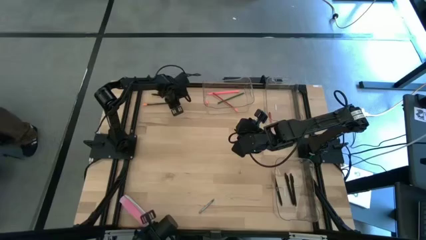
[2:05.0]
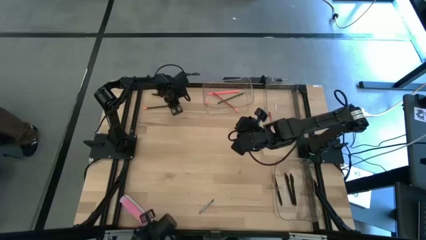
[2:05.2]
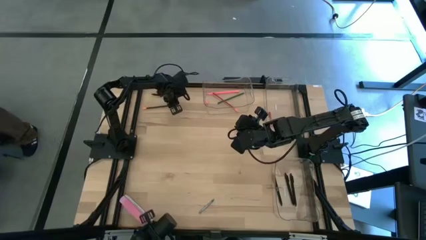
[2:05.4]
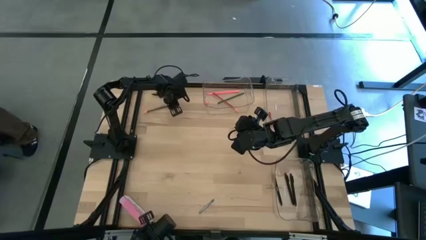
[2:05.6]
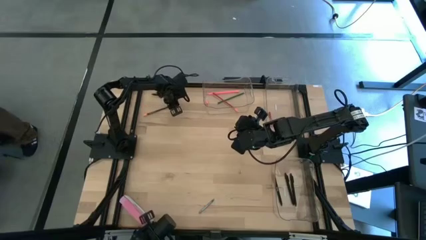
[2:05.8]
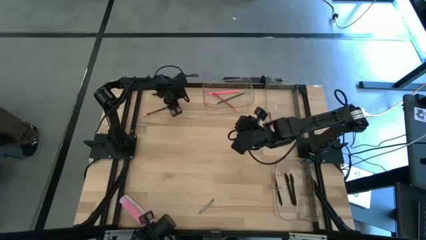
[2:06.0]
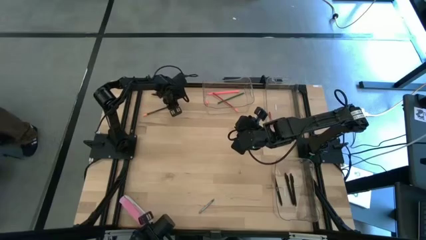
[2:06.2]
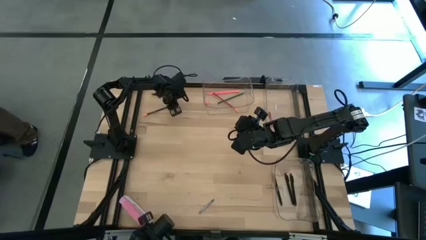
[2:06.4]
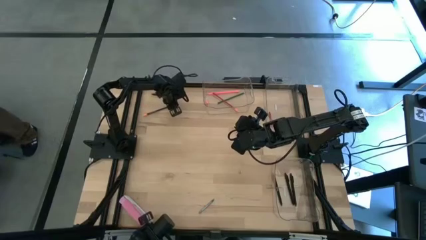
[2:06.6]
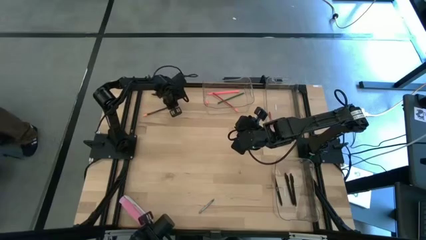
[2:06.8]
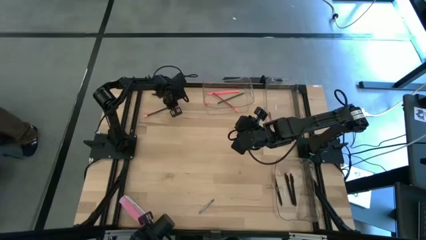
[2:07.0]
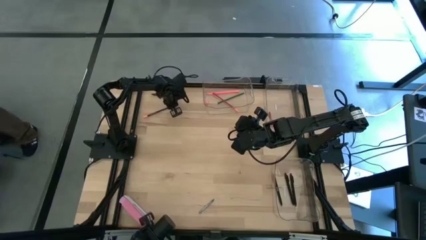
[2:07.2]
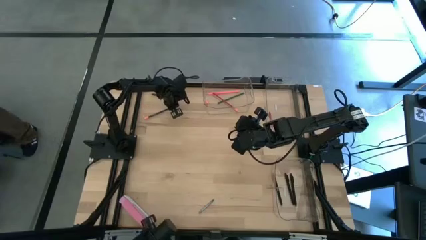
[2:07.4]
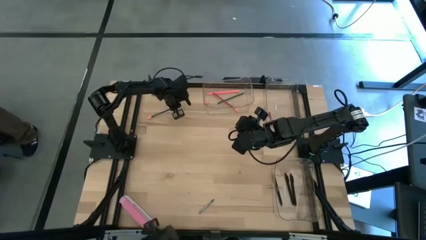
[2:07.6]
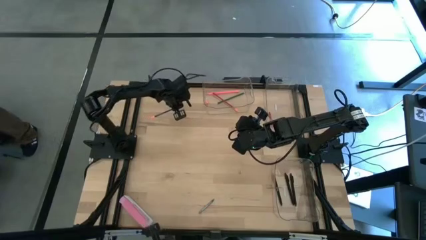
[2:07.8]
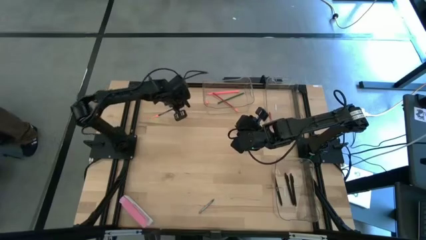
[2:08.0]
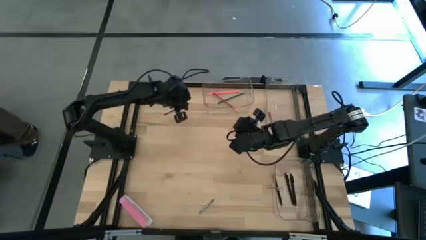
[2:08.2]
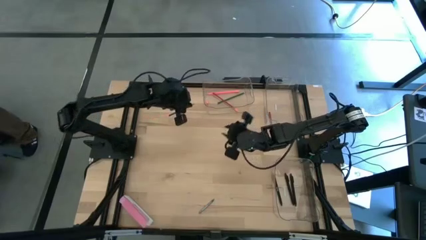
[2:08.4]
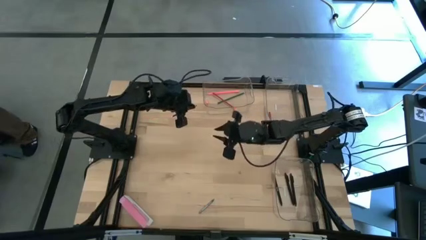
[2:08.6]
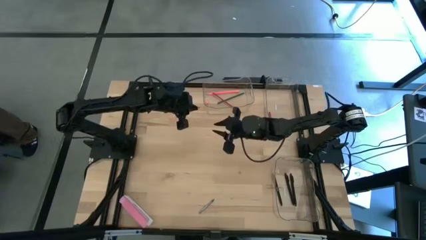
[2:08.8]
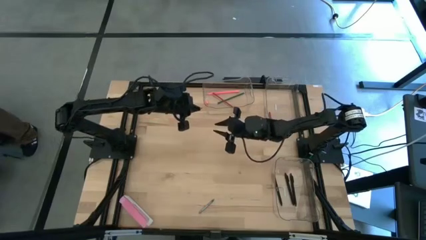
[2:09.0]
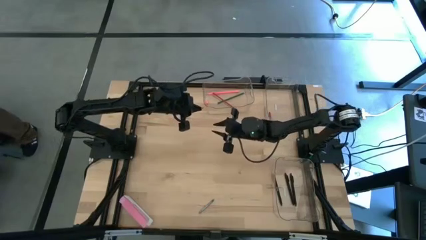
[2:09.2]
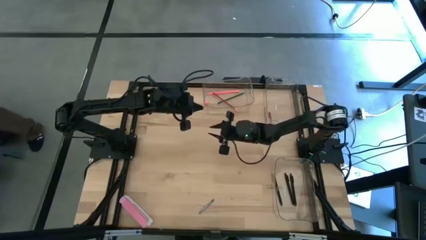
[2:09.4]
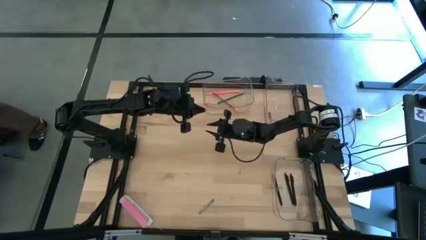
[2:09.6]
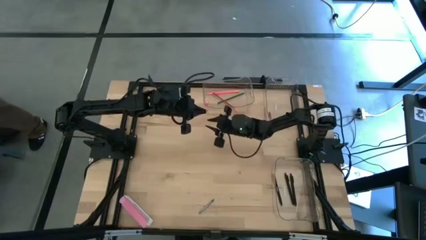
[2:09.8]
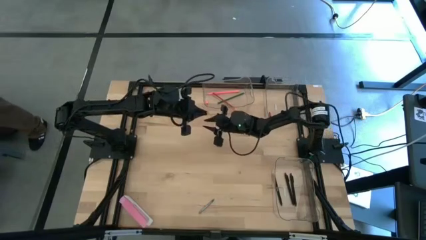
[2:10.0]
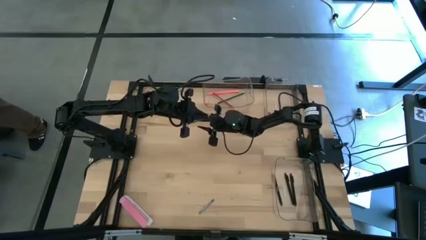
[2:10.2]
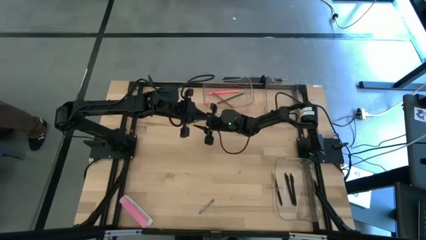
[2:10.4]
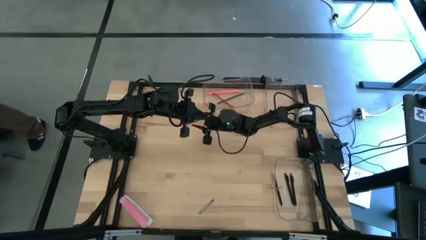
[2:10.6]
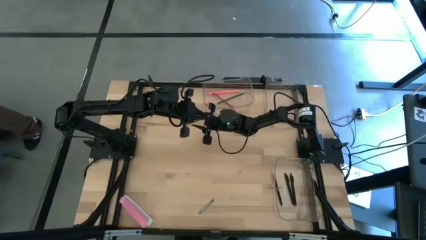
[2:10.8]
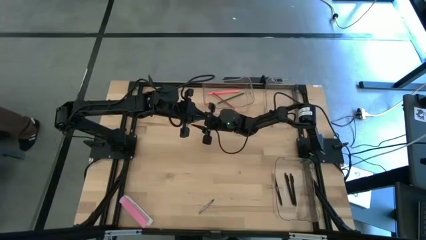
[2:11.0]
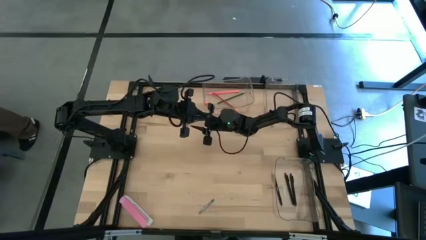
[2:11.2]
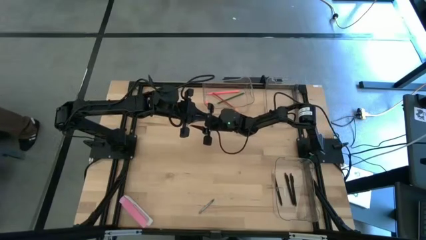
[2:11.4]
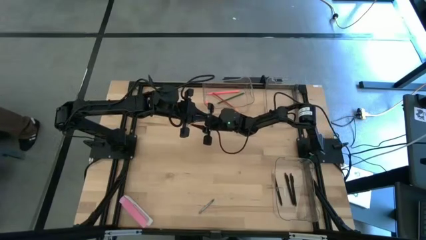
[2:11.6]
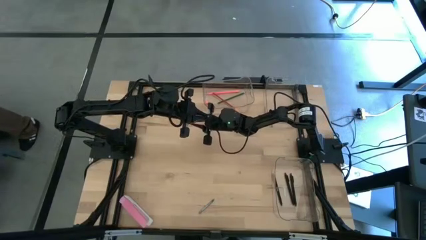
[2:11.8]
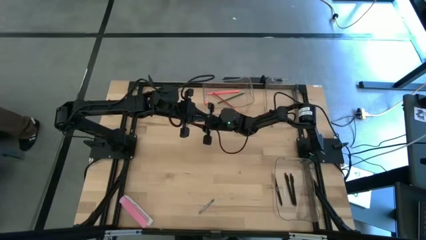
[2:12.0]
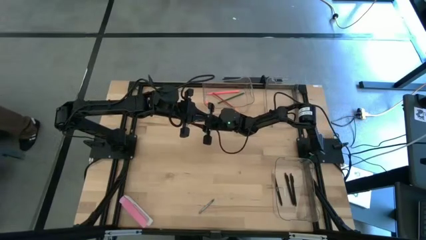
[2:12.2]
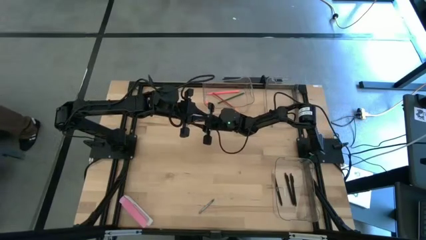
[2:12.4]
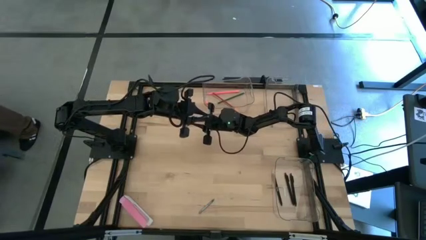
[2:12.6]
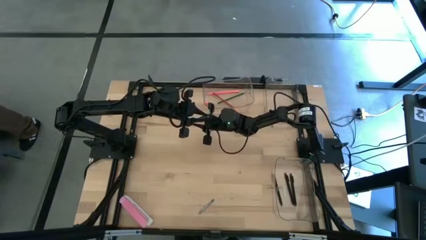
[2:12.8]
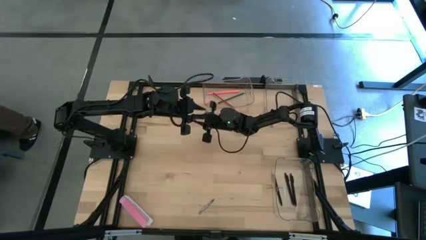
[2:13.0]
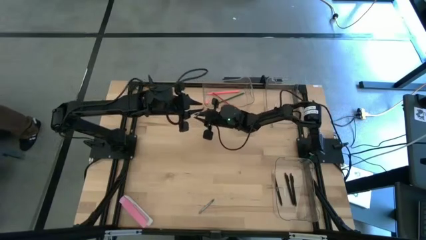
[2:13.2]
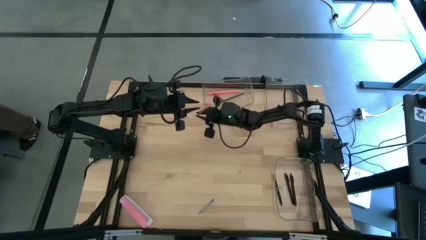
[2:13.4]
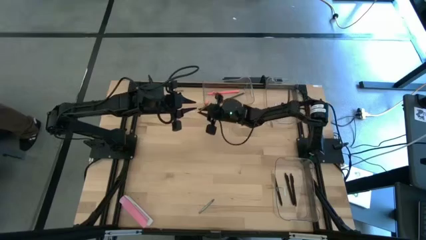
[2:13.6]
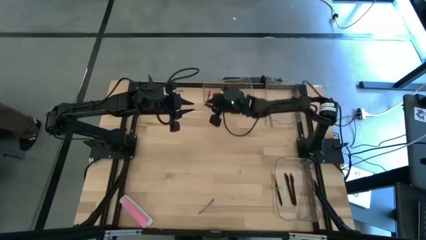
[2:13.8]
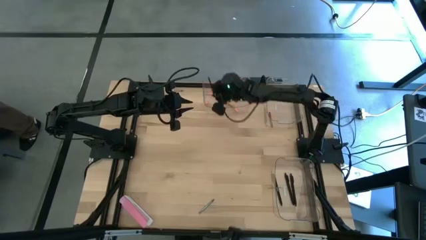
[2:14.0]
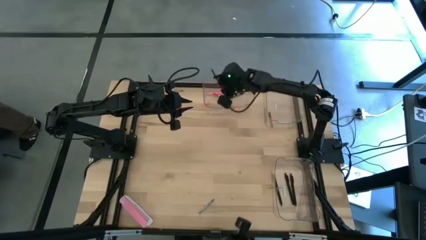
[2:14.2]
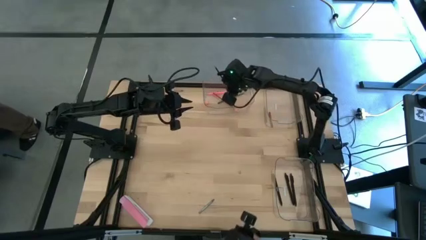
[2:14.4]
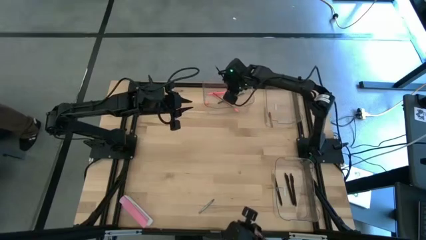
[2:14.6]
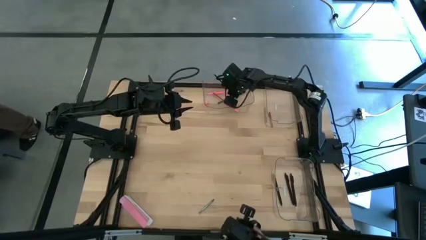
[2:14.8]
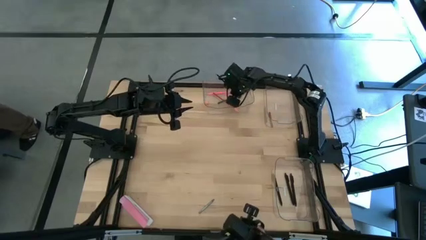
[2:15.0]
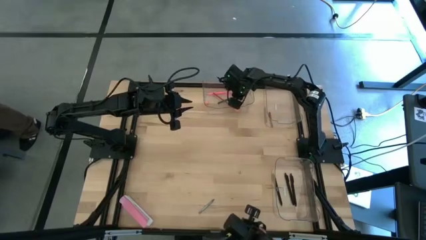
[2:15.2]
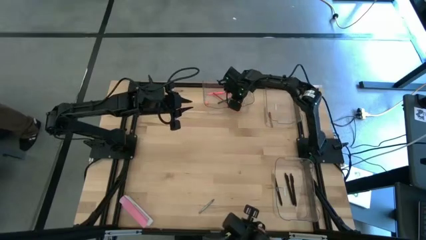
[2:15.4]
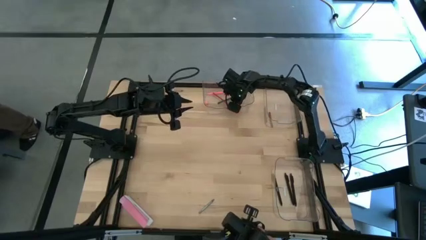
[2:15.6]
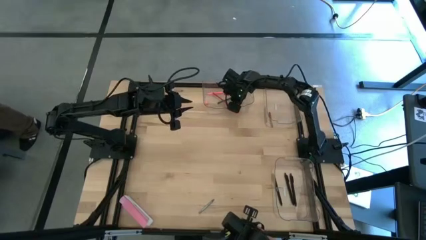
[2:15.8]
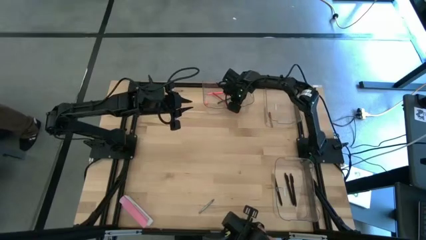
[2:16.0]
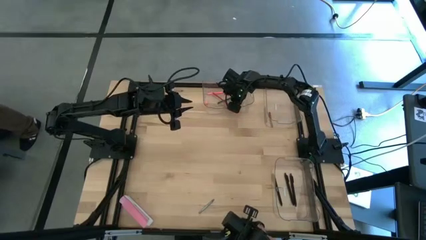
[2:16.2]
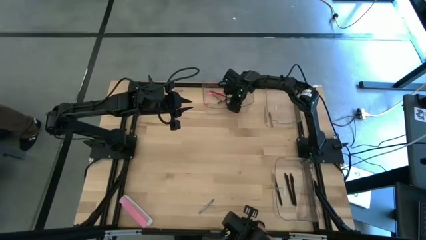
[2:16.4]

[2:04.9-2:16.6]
Task: Sort crayons/erasers/pens/pencils in bins
Put the dark blue pencil into the top left transparent bin
